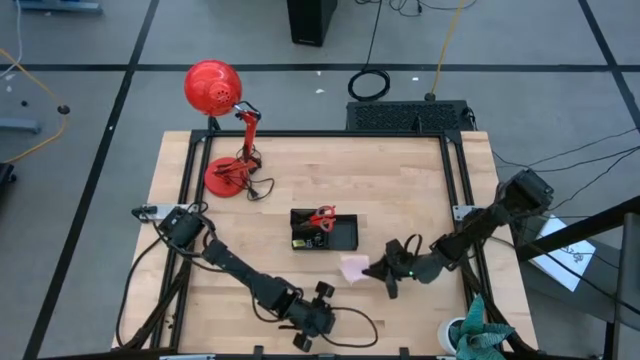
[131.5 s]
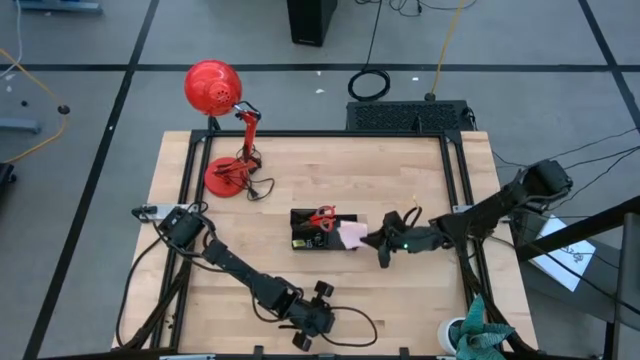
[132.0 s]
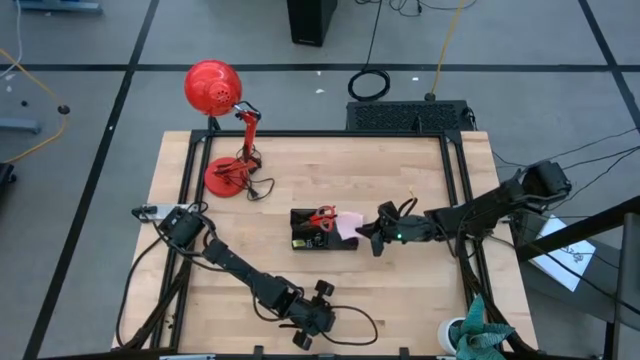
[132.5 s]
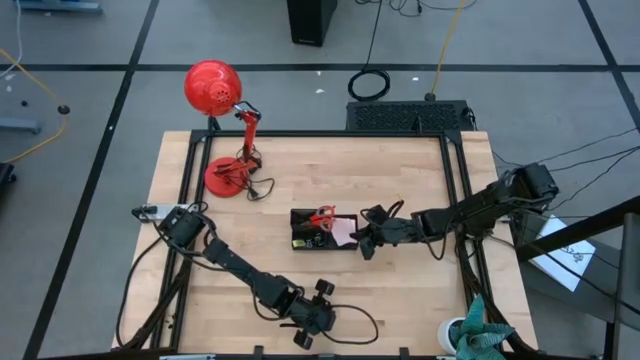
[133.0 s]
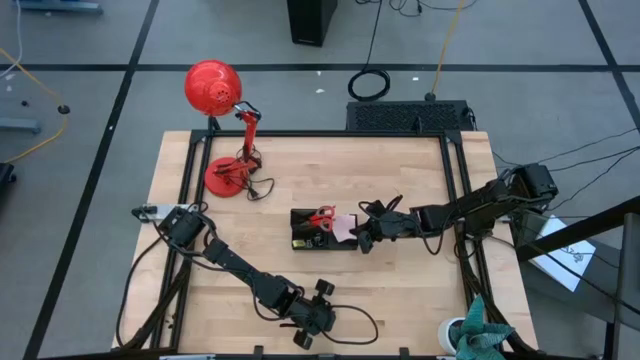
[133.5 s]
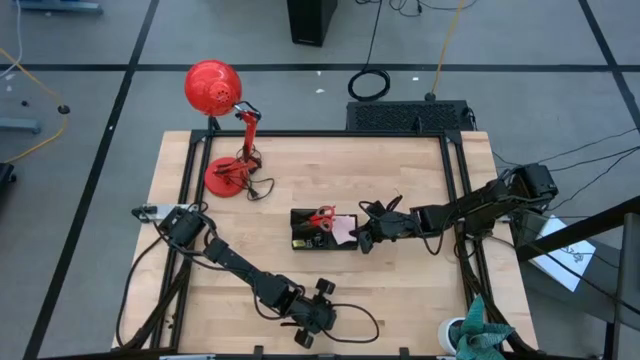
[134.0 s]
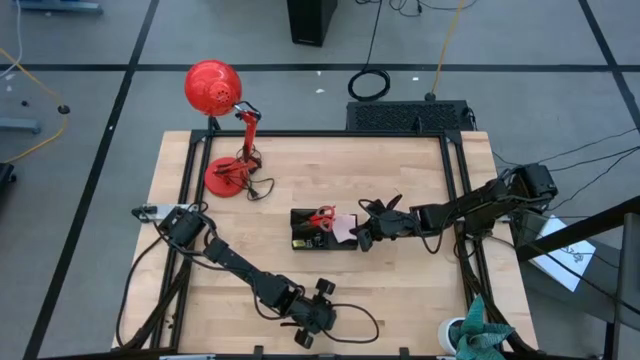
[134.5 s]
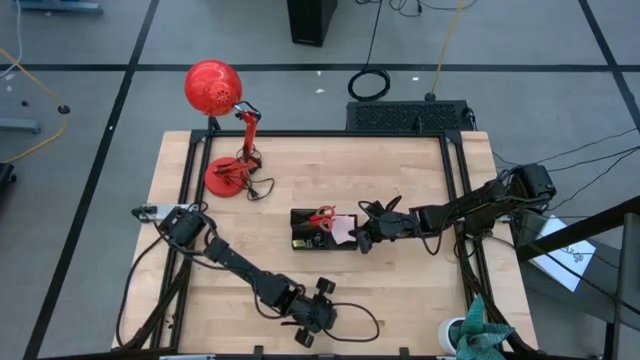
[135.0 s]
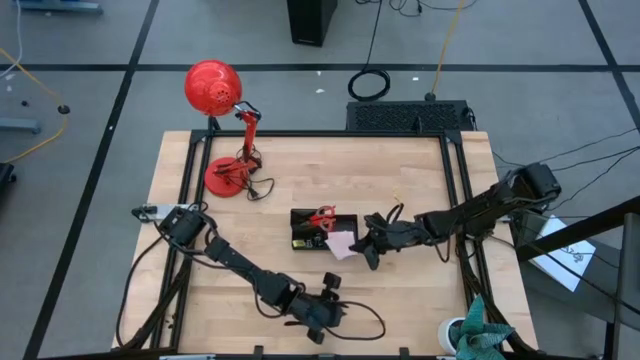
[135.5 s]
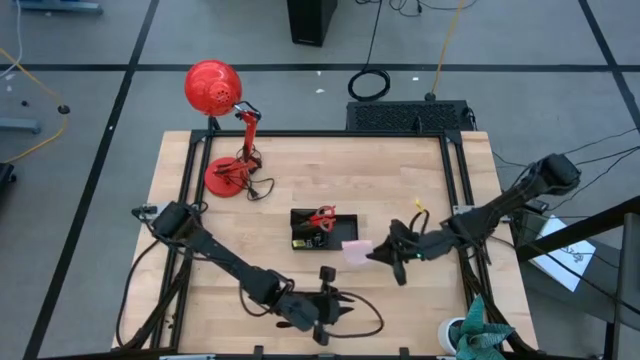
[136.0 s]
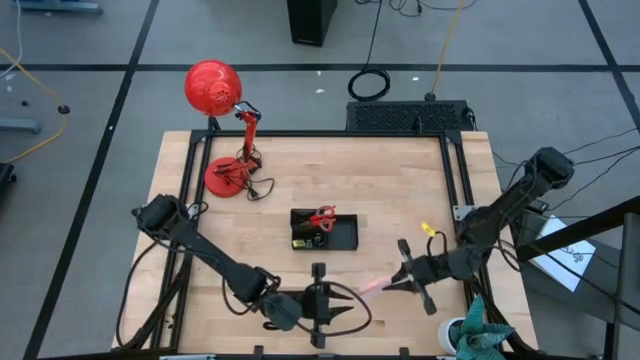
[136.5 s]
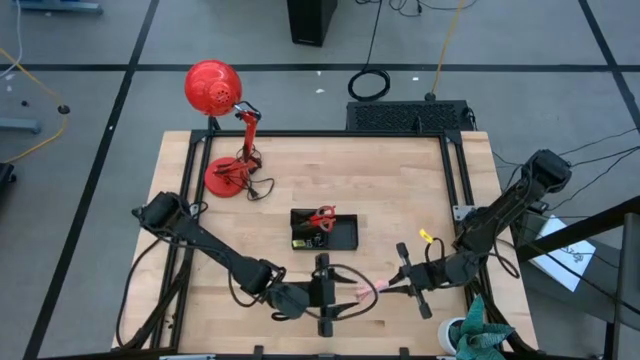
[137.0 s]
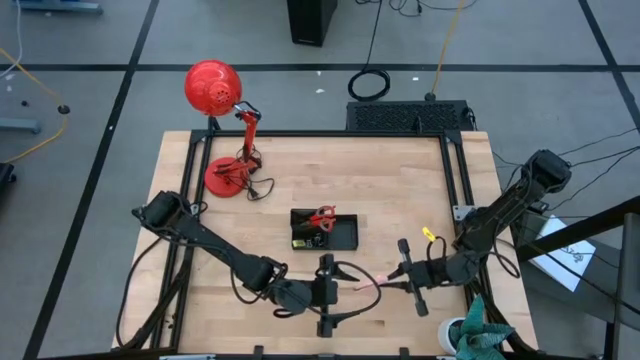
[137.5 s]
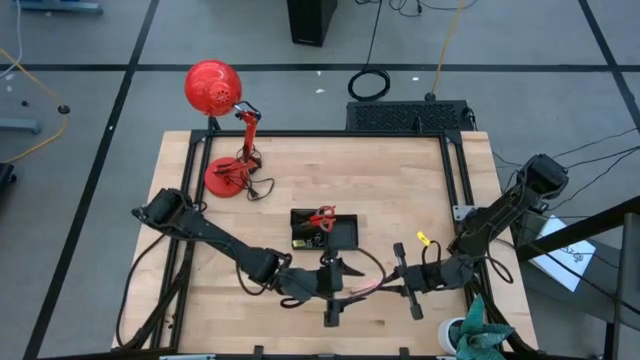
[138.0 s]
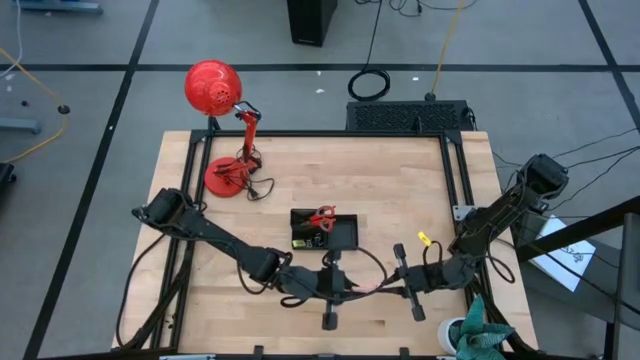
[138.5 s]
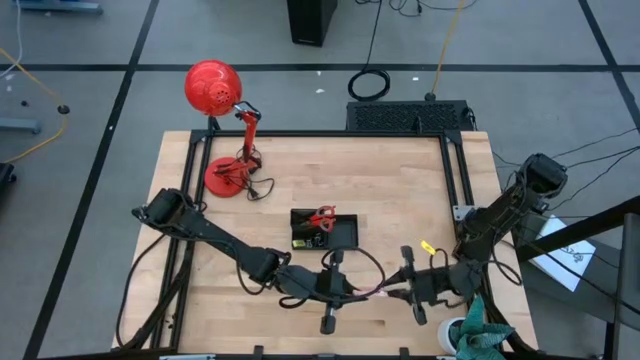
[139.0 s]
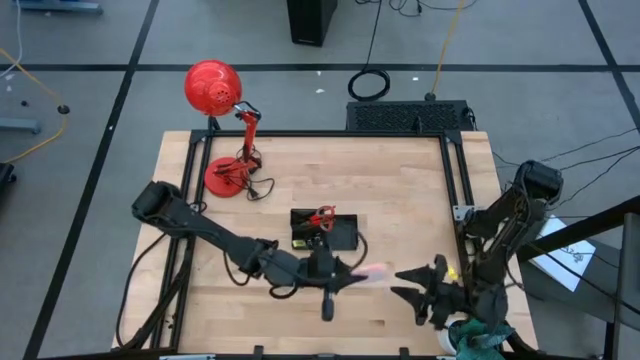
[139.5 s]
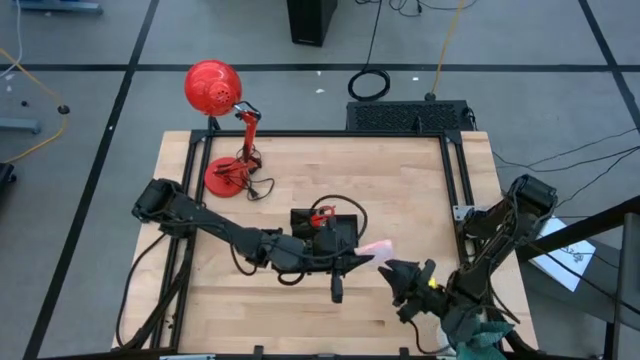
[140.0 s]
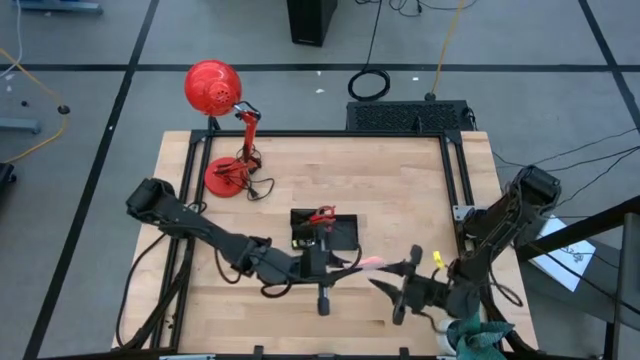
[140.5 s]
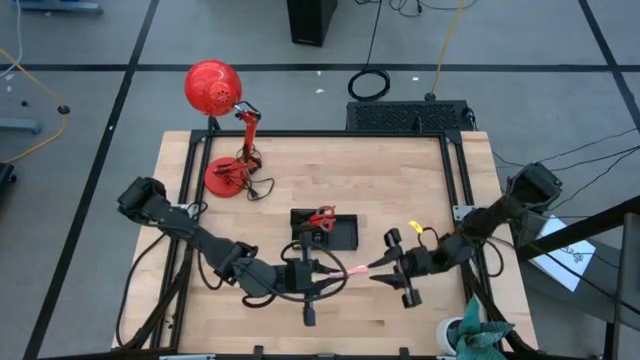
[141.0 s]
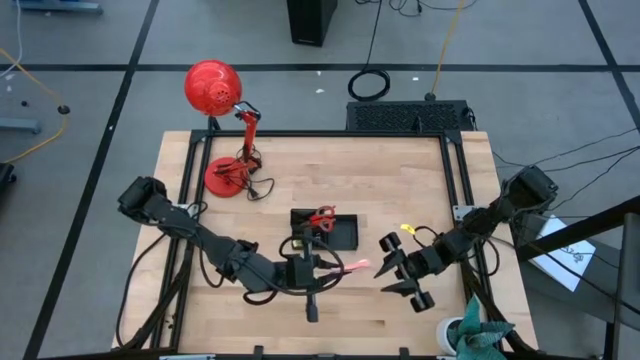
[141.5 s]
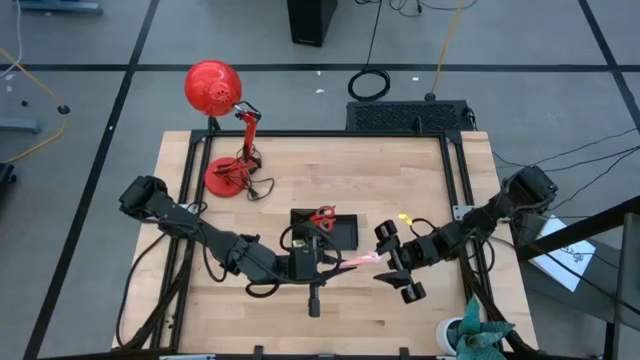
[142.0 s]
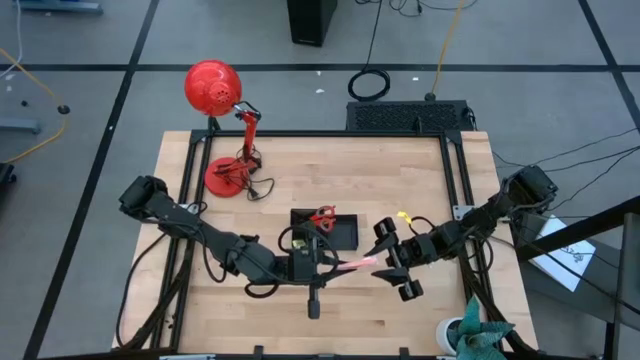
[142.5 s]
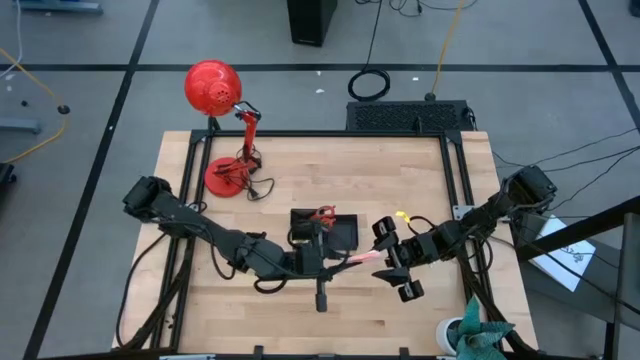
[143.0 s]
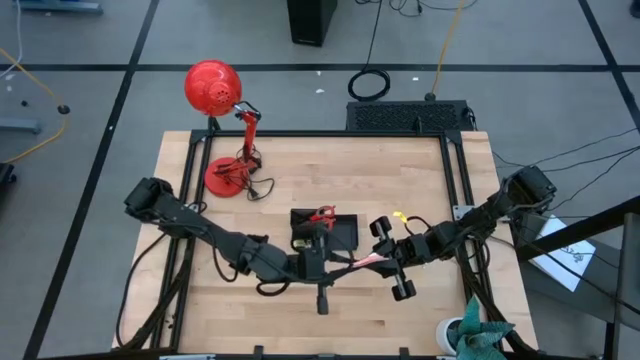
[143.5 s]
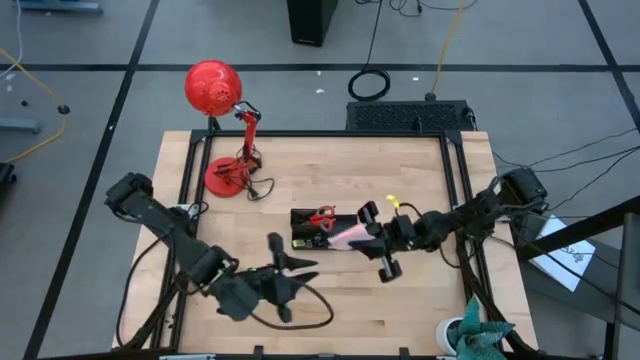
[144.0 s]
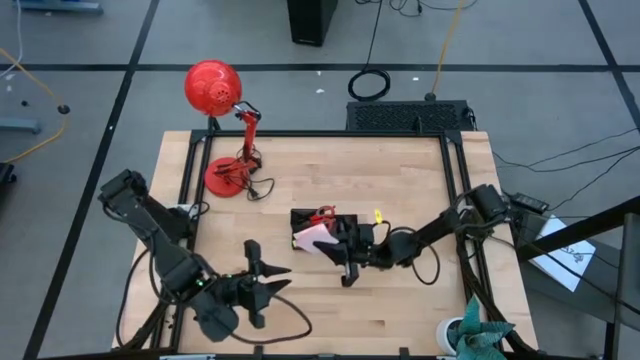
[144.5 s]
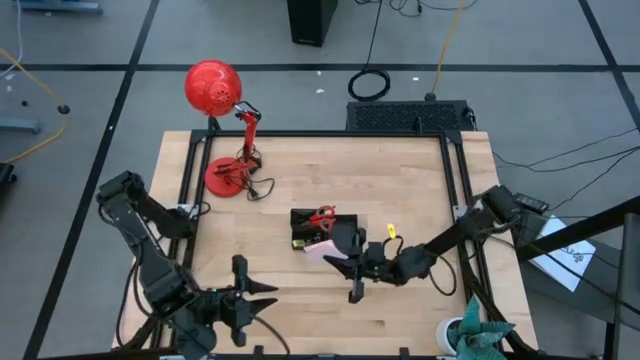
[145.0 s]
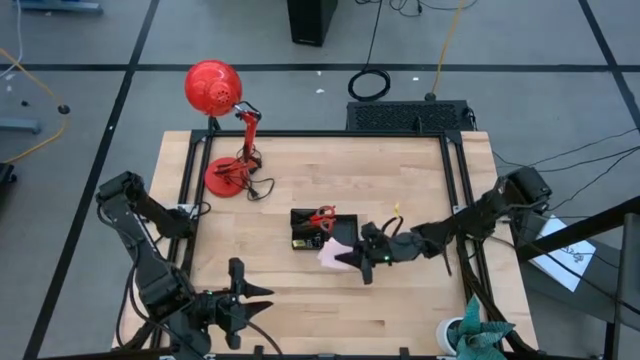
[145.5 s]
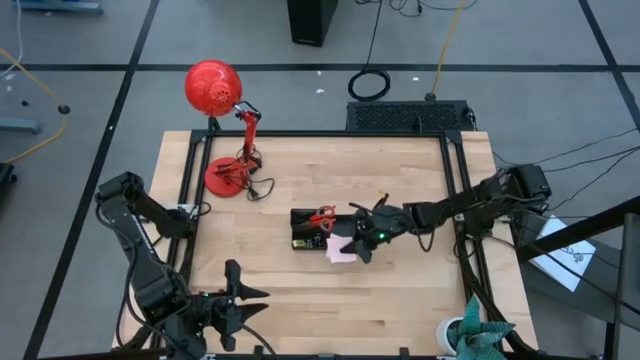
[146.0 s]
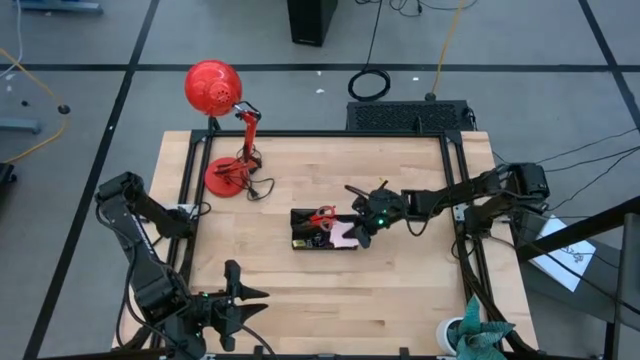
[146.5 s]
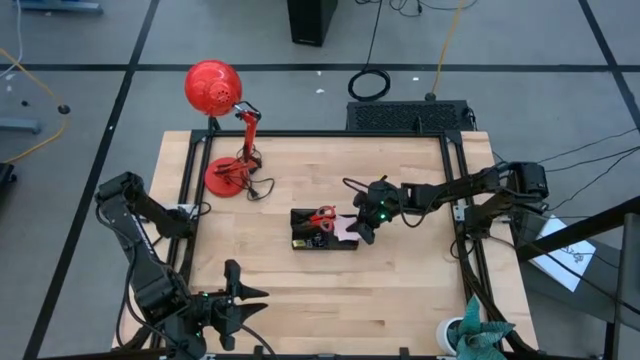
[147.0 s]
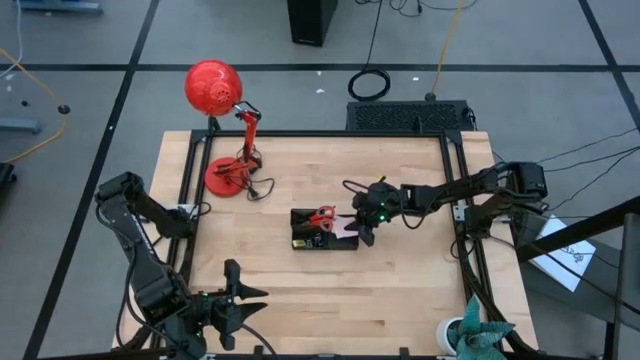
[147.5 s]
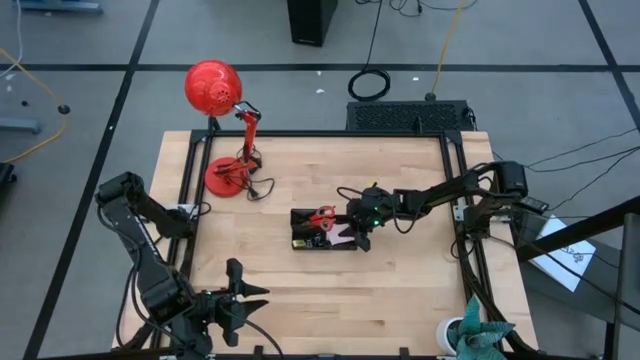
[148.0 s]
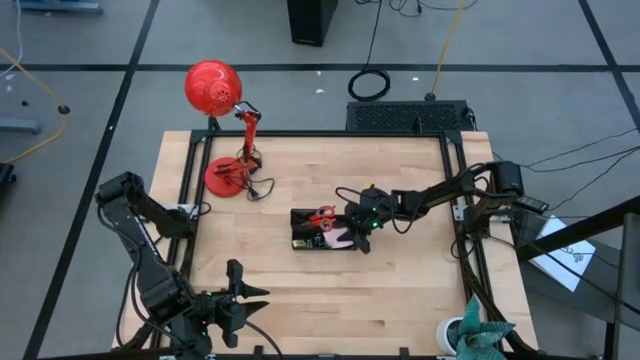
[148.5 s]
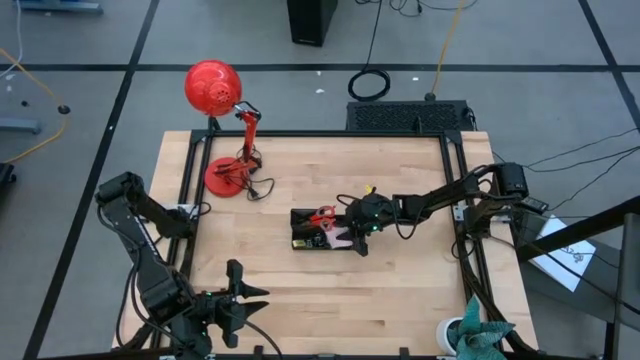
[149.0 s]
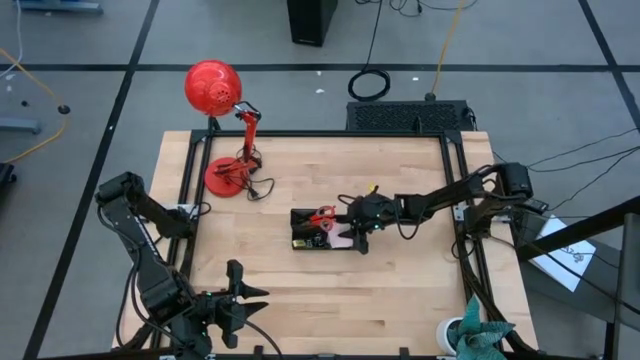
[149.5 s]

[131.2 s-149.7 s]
Task: Pick and place office supplies into organizer
Put the sticky note into the desk organizer

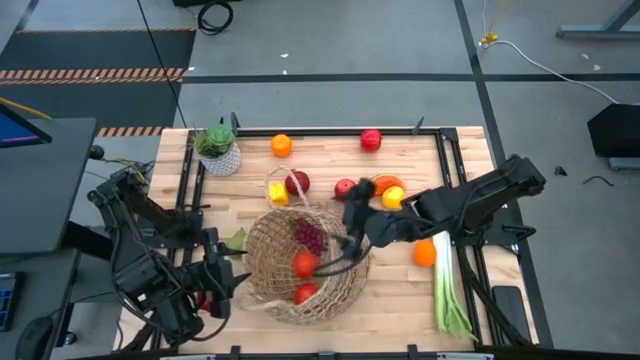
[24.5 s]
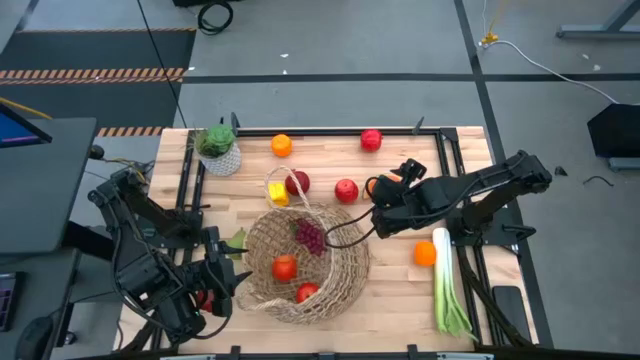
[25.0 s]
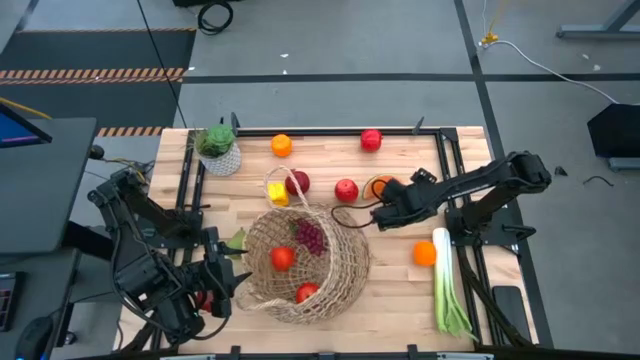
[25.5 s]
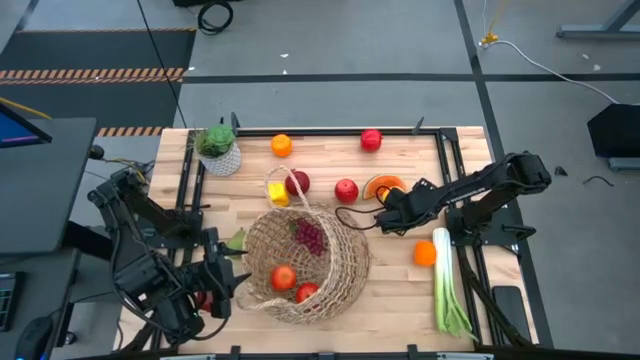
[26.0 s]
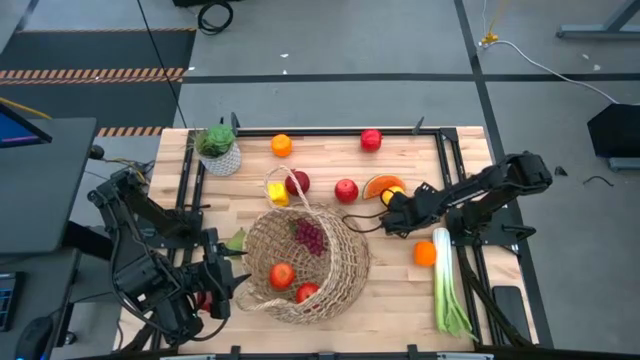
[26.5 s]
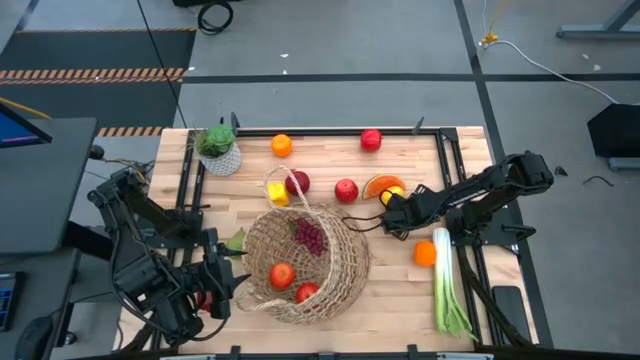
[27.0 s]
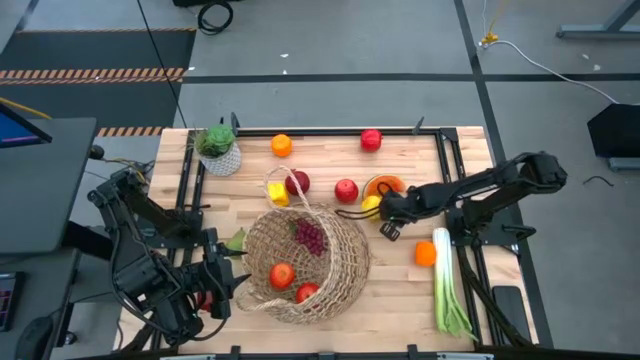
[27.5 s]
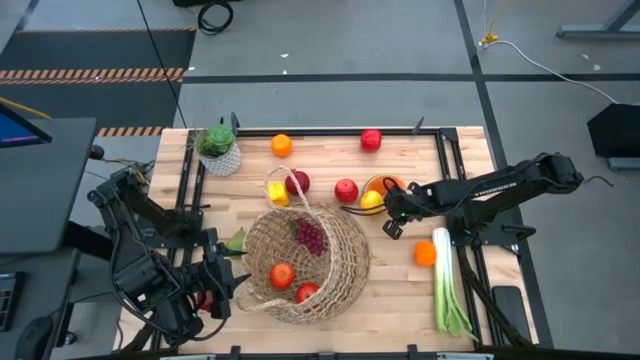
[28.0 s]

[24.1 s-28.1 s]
Task: Build produce basket
Put the pear into the basket
